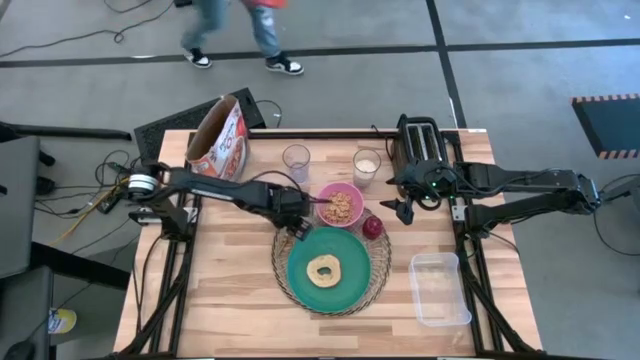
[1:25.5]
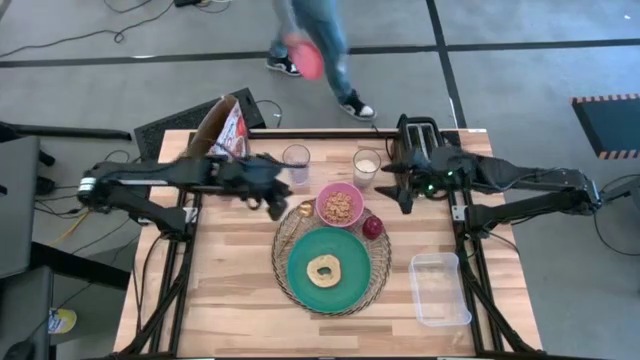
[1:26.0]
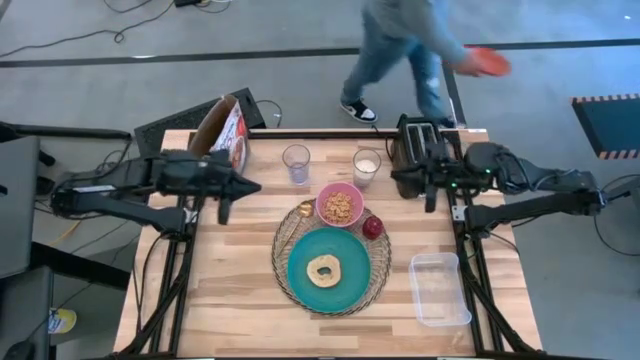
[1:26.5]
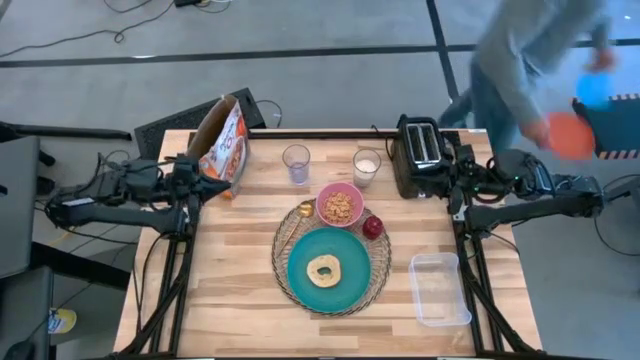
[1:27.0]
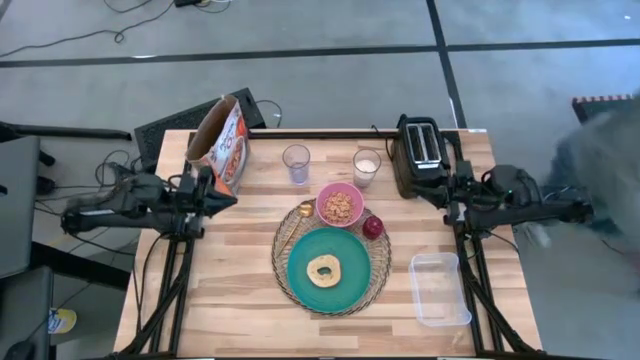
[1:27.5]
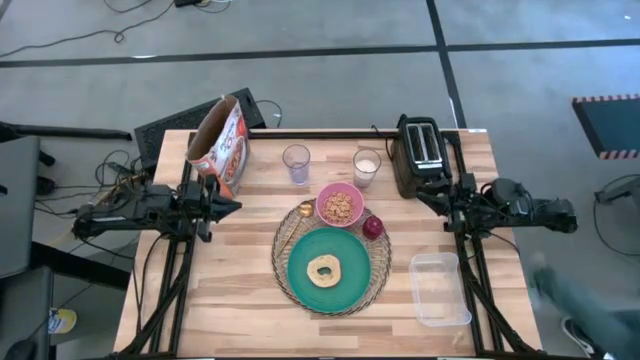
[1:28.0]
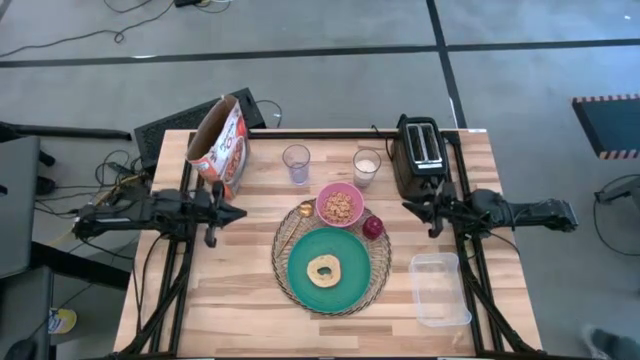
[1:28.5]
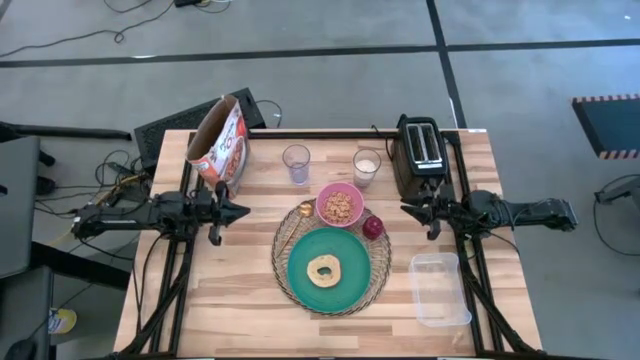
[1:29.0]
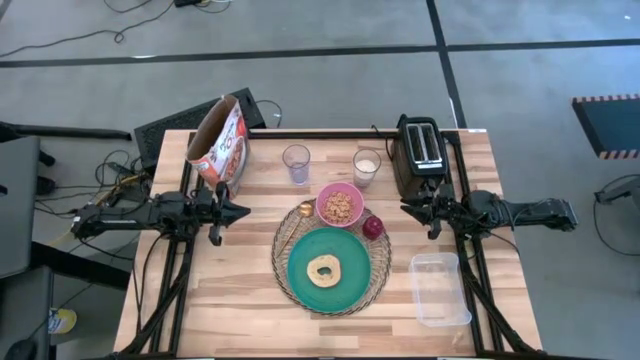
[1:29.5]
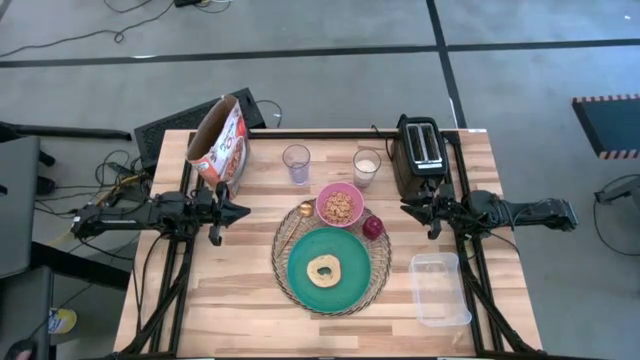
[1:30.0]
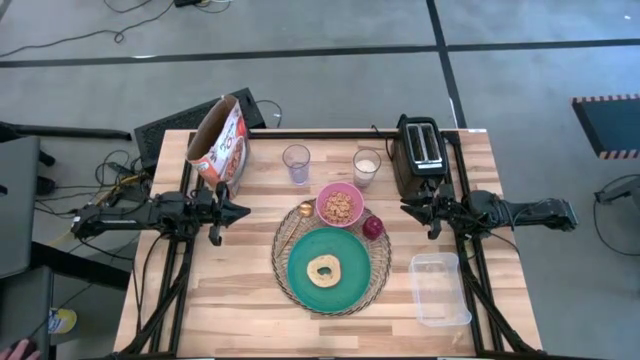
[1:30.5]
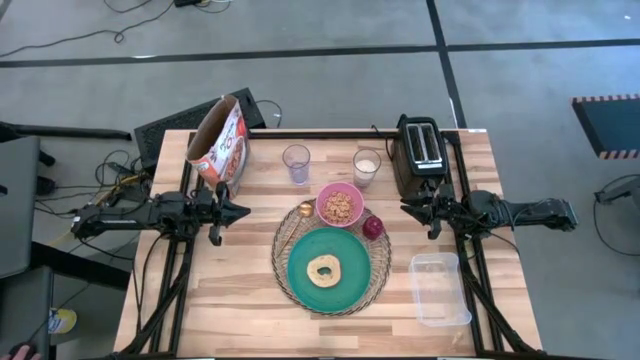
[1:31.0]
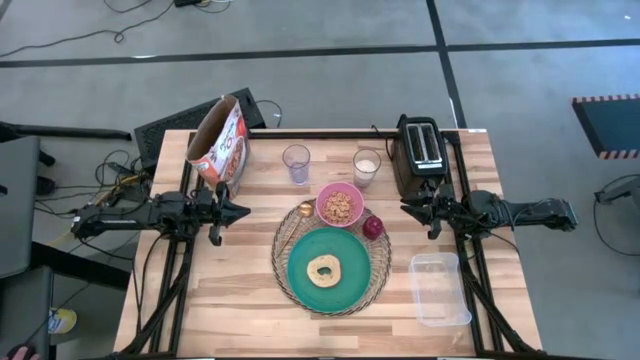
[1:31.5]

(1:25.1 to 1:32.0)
Task: Arrange a breakfast setting
Return to Home Position

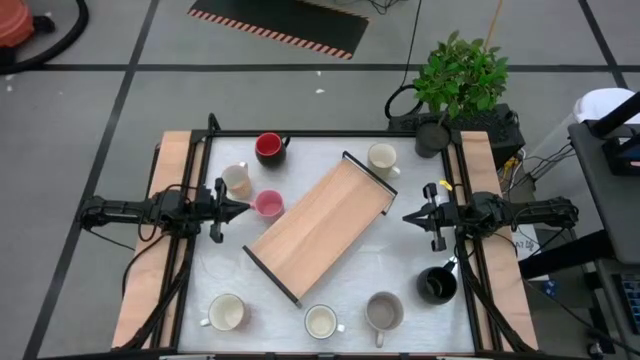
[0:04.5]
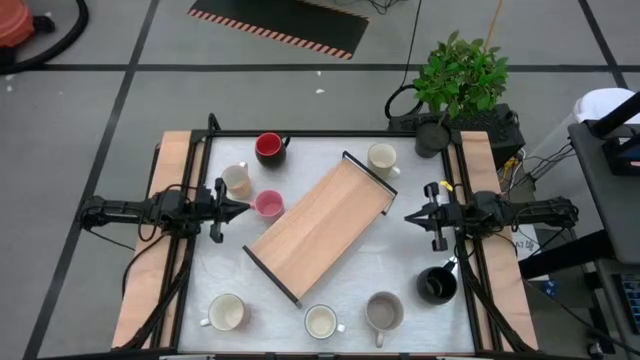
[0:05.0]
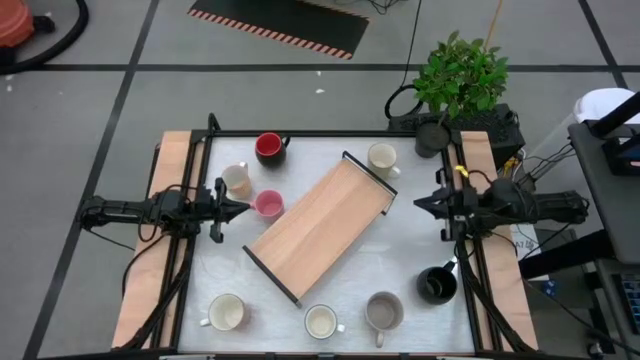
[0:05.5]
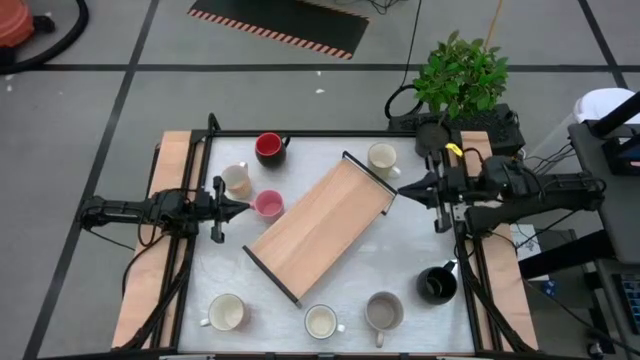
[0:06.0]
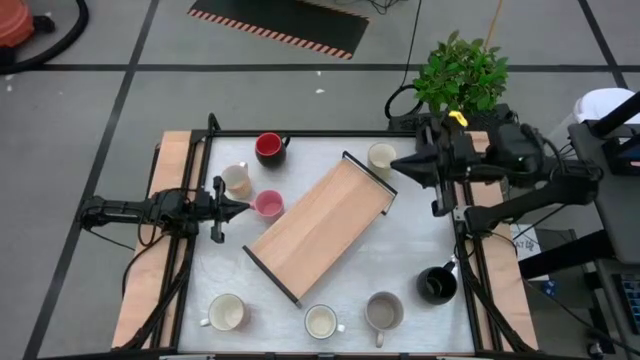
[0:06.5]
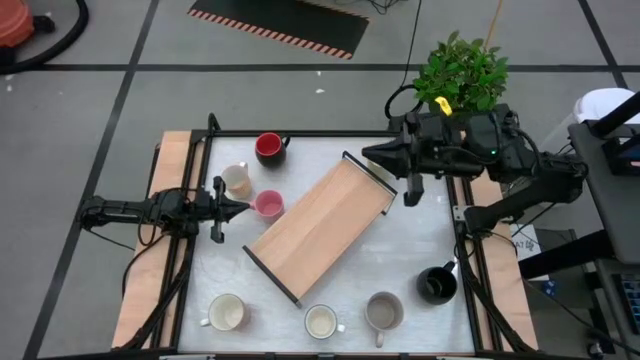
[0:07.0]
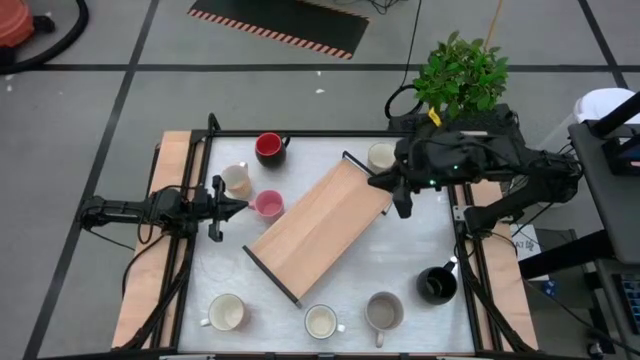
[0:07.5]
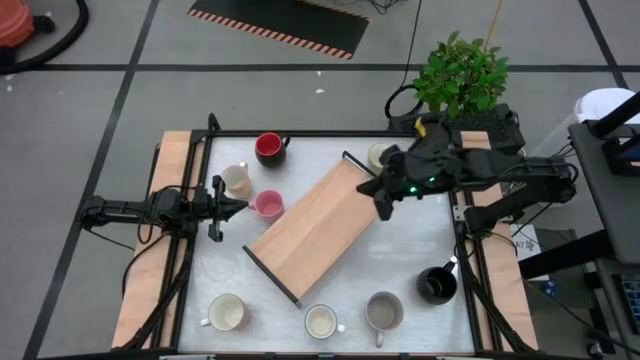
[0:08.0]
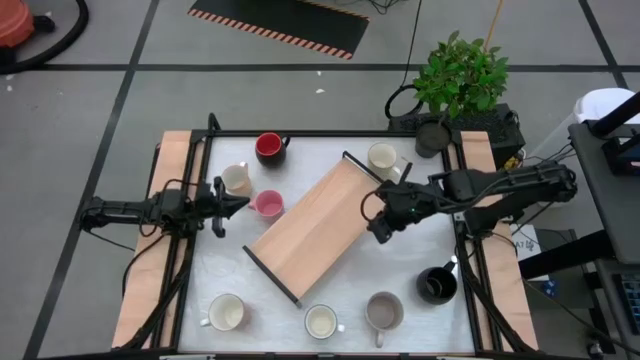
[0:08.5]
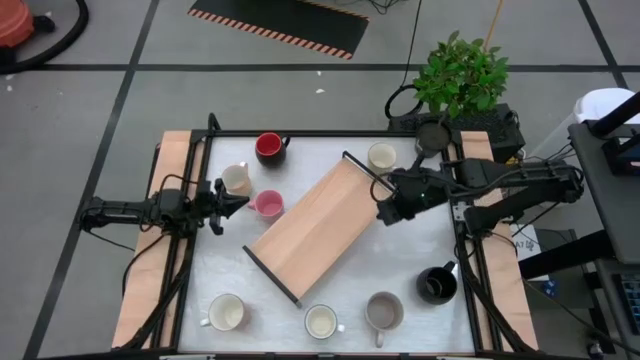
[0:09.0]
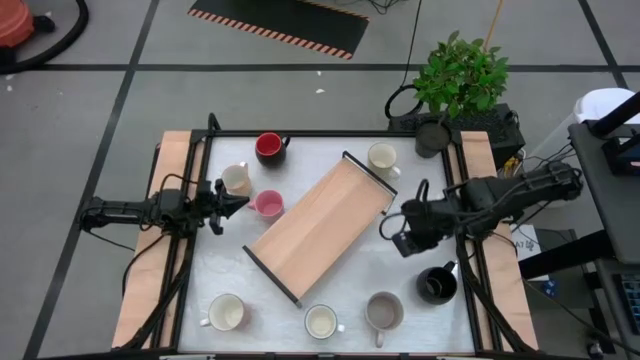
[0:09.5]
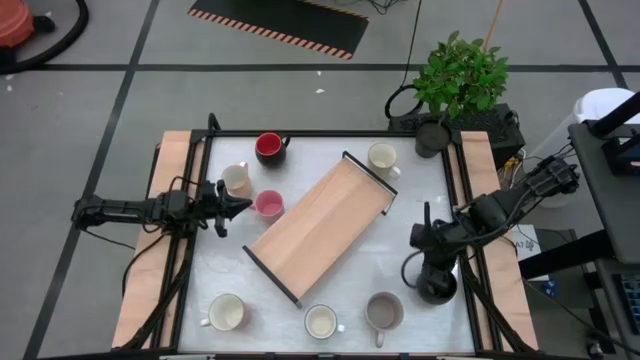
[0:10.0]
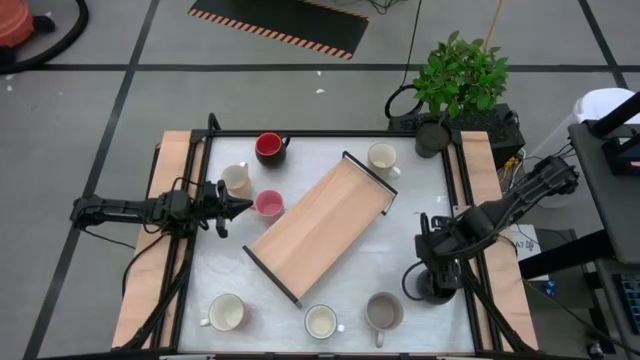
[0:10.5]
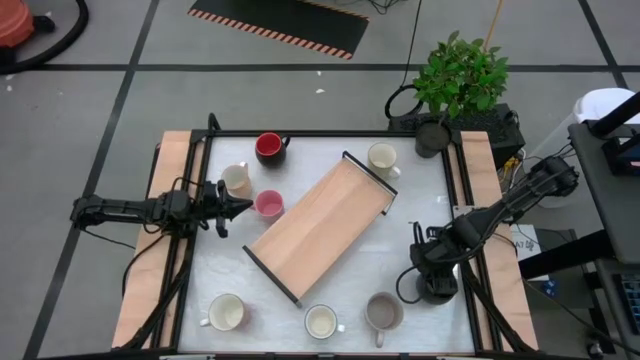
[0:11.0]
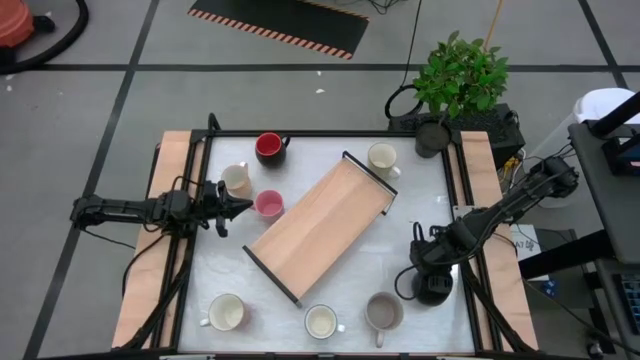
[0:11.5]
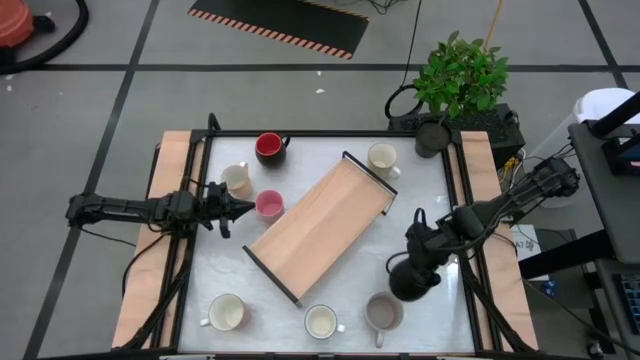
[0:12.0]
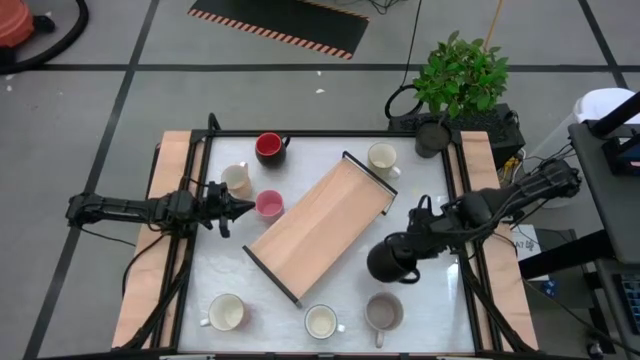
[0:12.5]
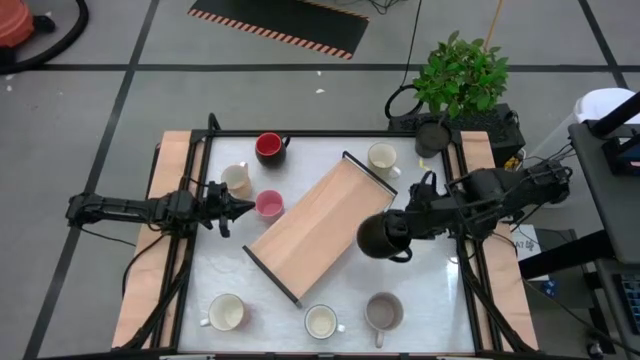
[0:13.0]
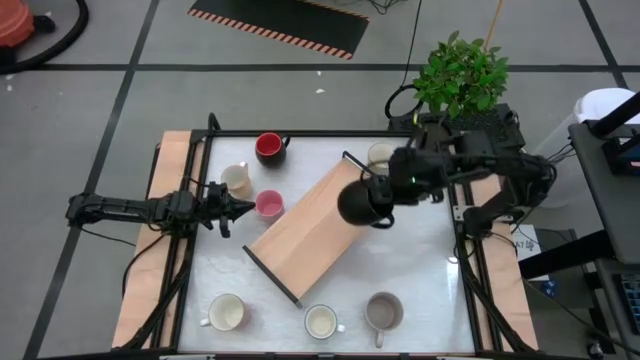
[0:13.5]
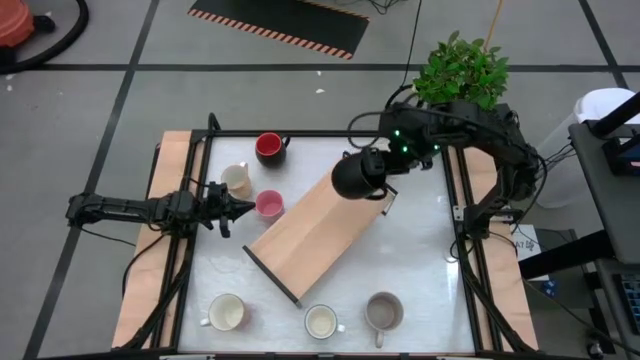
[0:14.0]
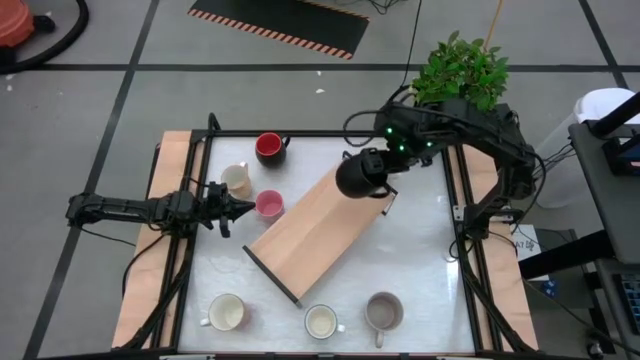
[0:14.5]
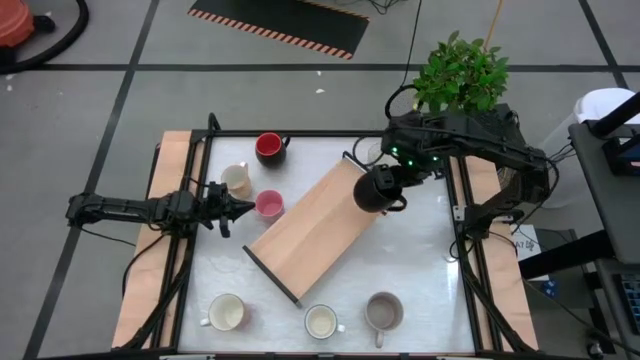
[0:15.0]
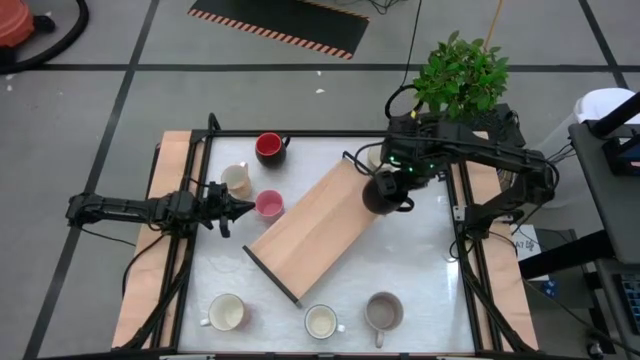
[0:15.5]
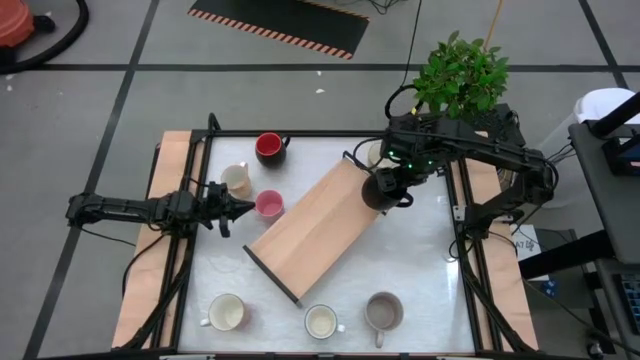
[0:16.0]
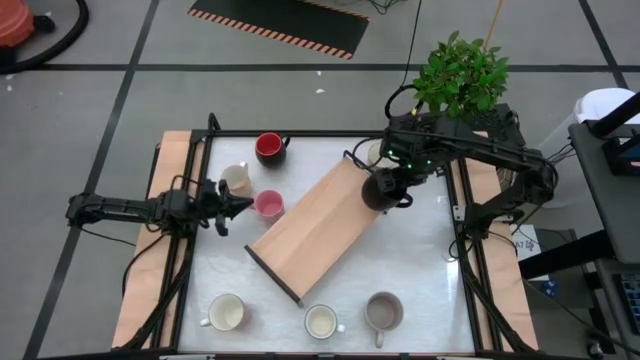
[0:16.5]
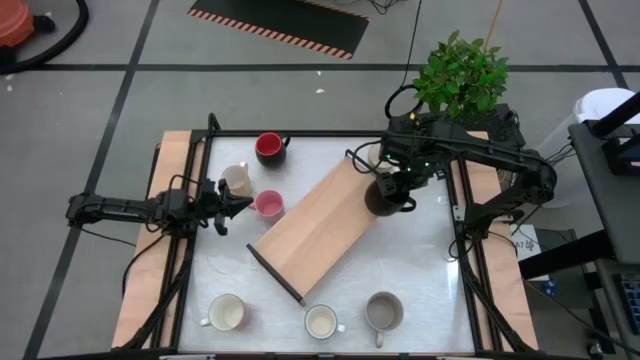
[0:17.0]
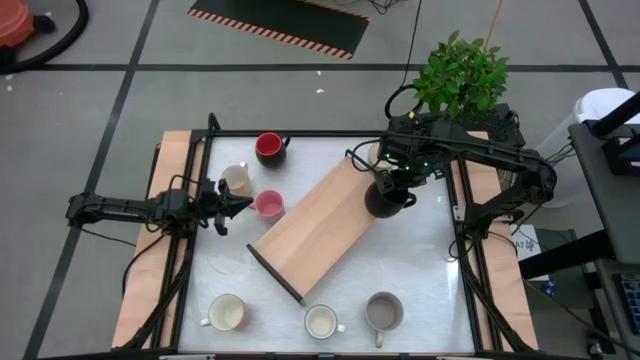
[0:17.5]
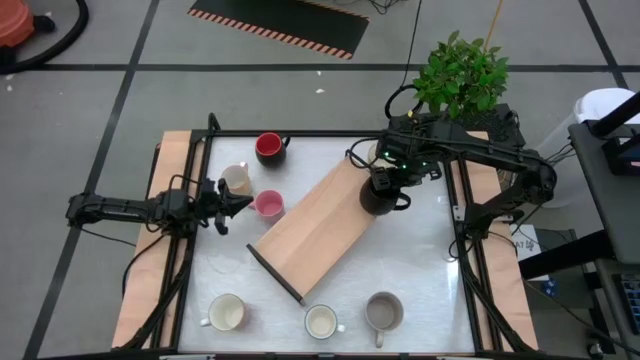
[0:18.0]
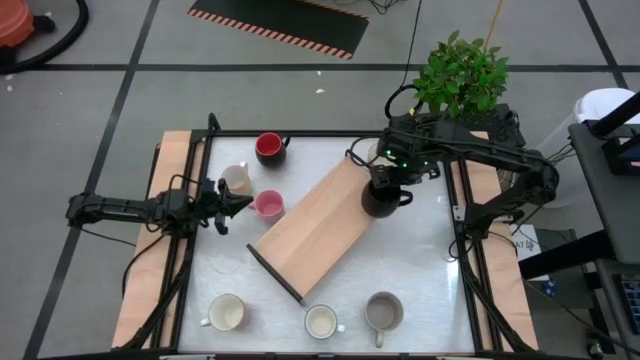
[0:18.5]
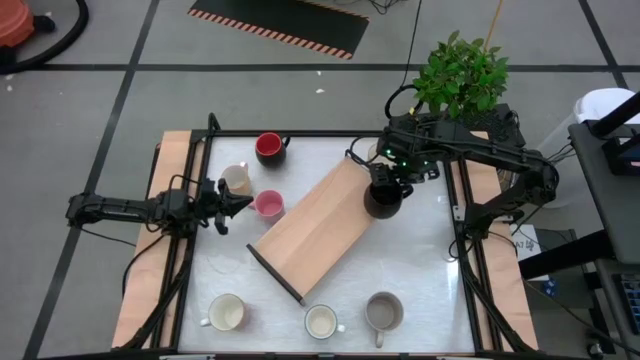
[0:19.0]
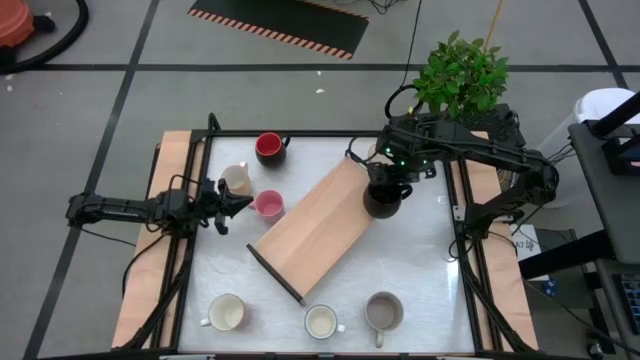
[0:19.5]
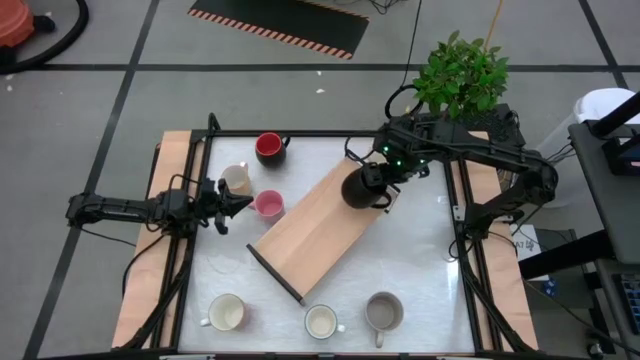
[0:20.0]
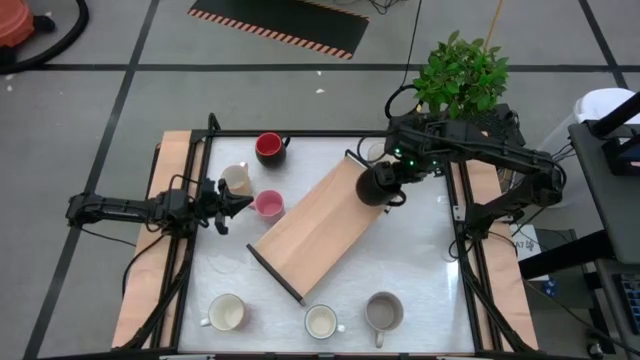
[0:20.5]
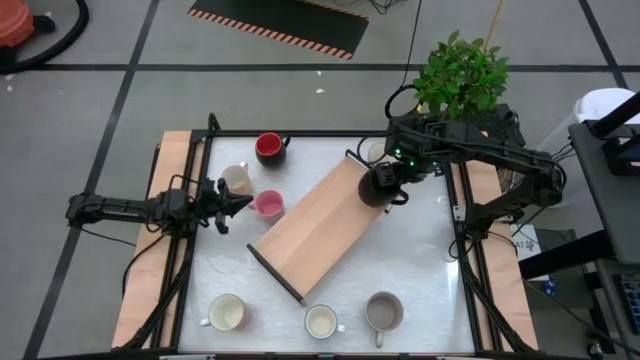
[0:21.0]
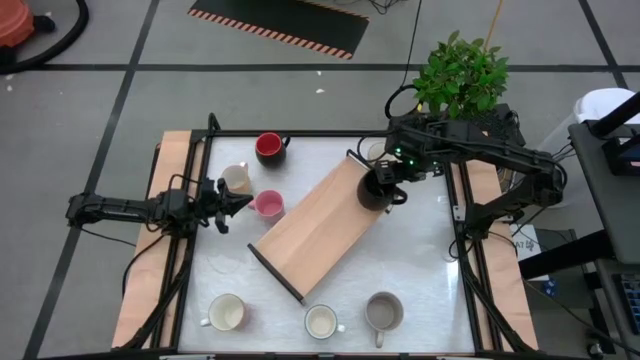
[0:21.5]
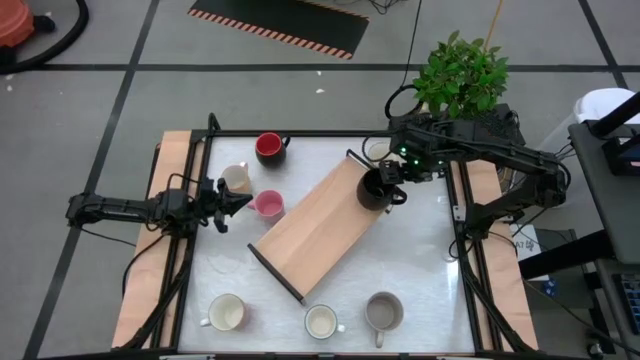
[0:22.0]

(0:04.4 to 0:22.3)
Task: Place coffee mugs
Put the right black mug on top of the shelf
